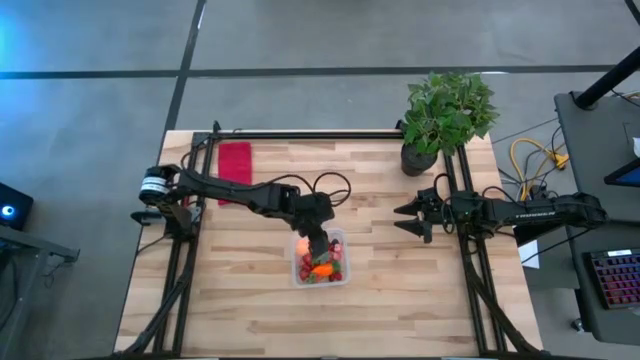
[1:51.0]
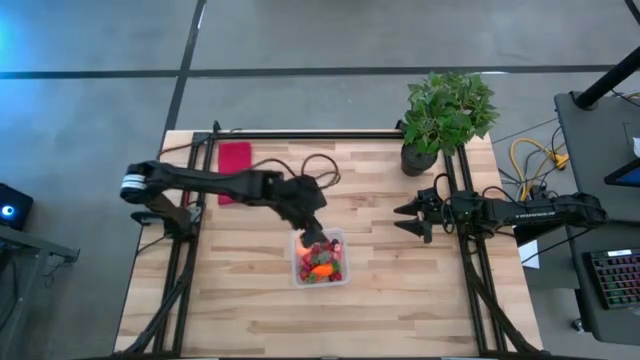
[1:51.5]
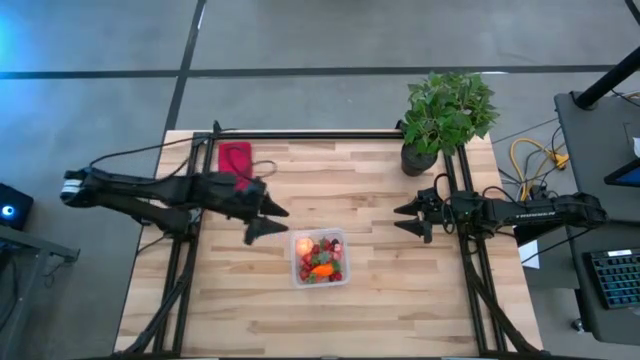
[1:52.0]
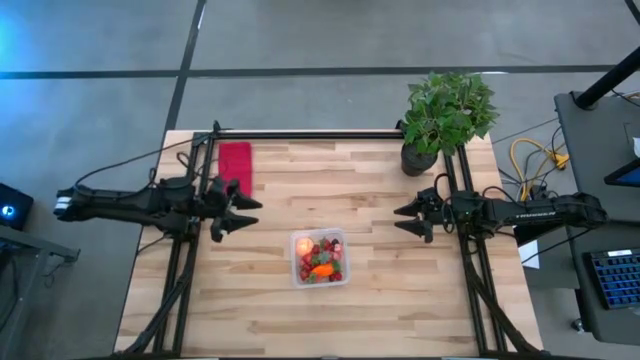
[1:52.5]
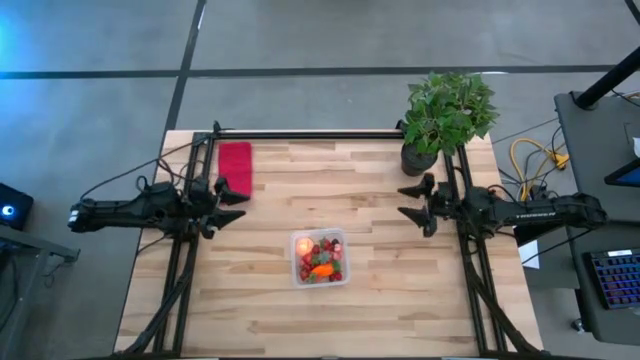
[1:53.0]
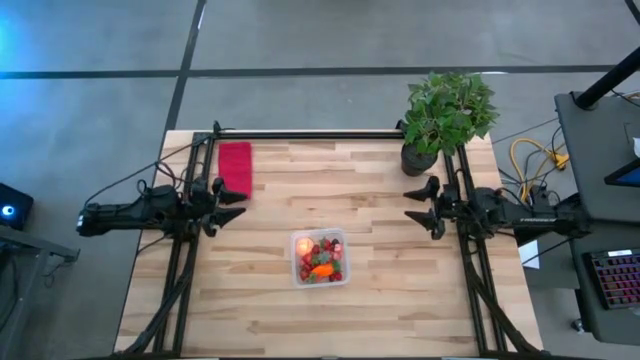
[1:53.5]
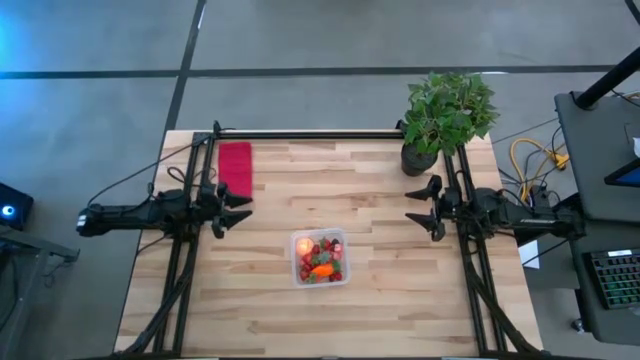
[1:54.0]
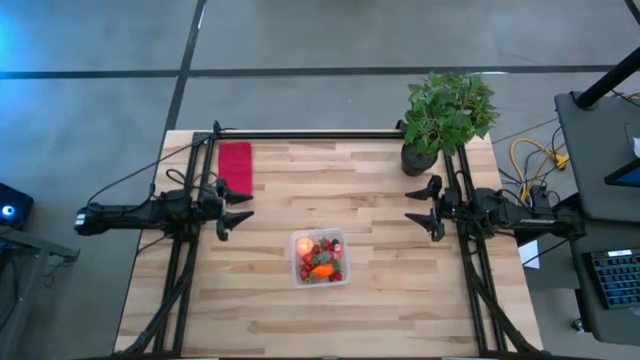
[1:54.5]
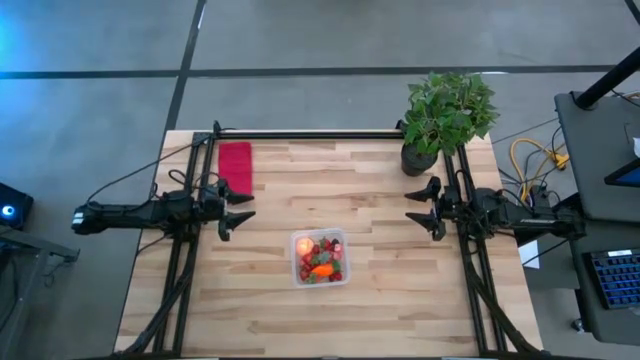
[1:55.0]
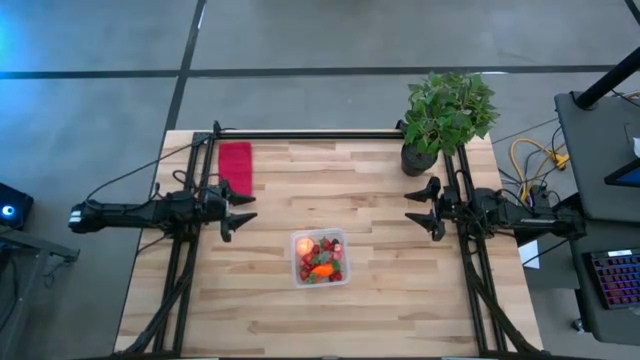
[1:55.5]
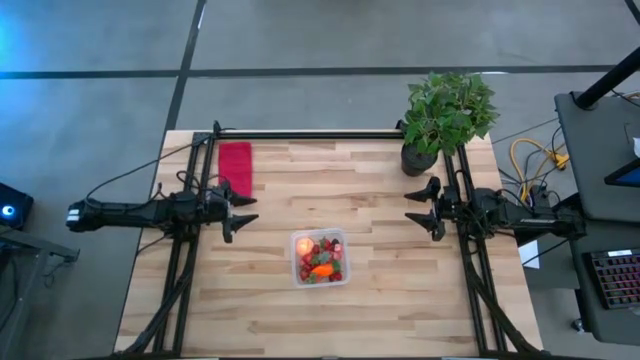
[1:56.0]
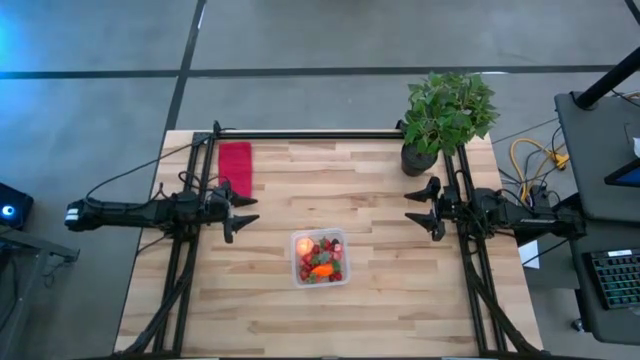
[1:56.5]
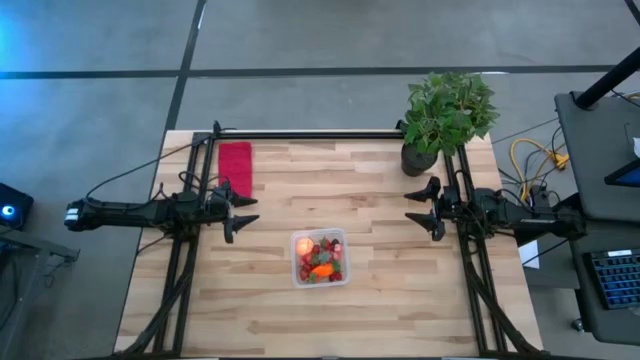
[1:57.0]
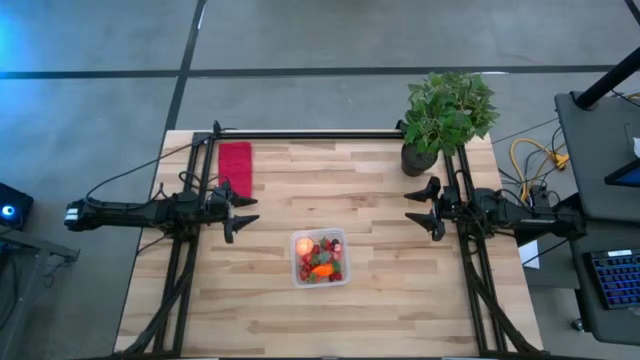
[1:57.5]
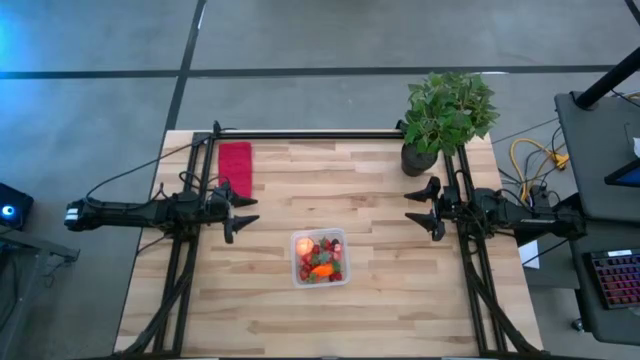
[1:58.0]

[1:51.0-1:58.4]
Task: Pick and placing Produce into tupperware
Return to Home Position

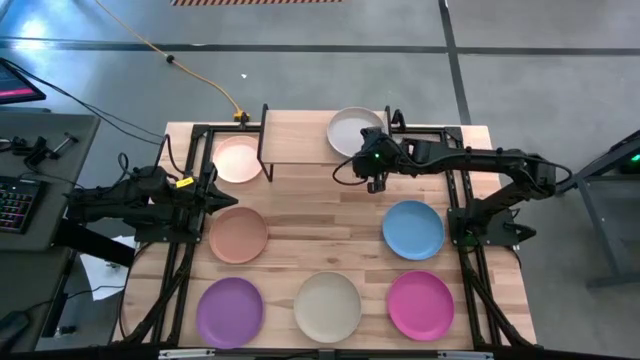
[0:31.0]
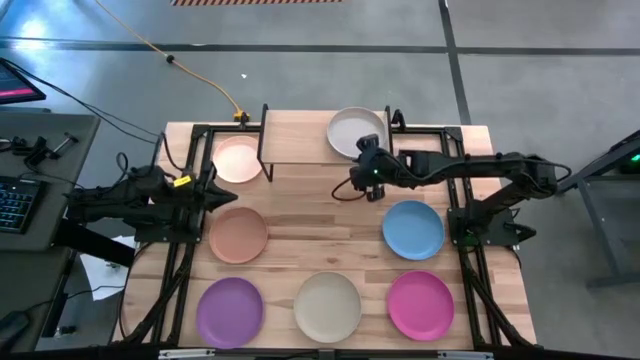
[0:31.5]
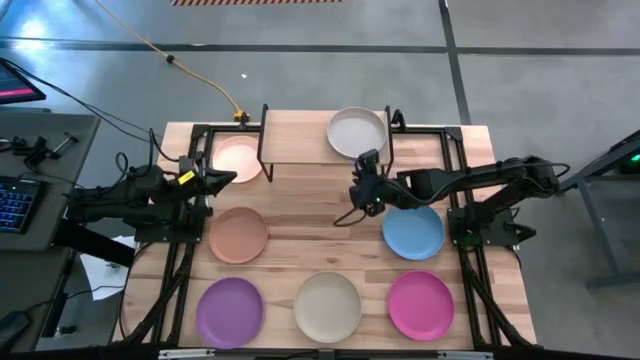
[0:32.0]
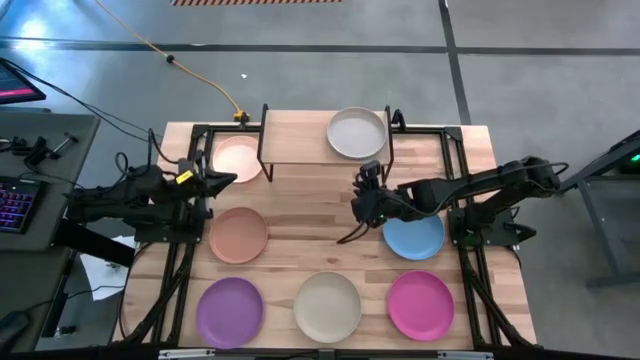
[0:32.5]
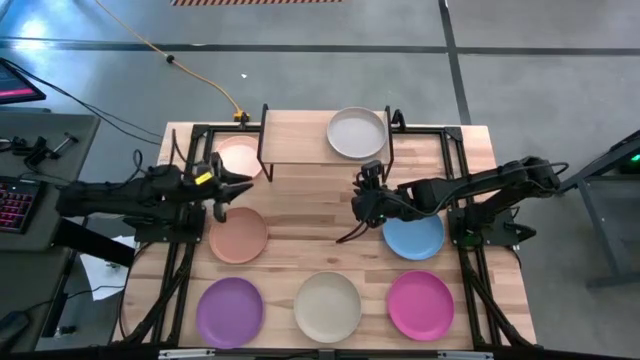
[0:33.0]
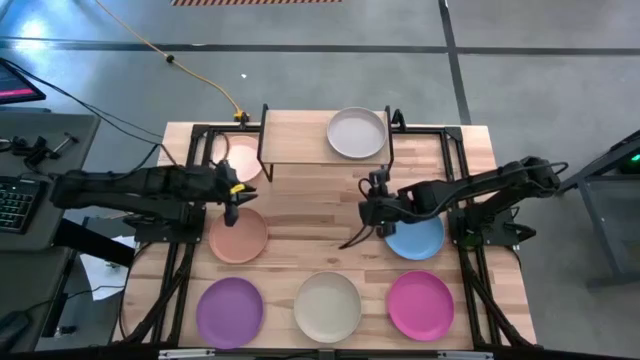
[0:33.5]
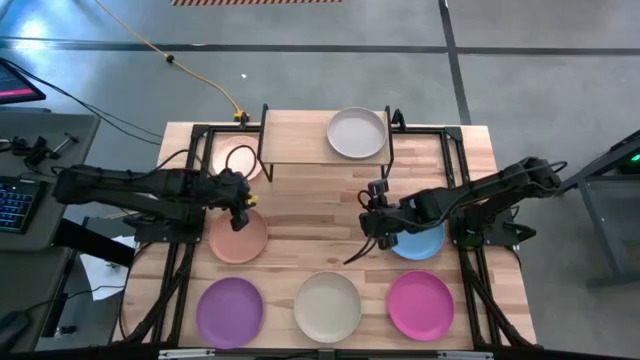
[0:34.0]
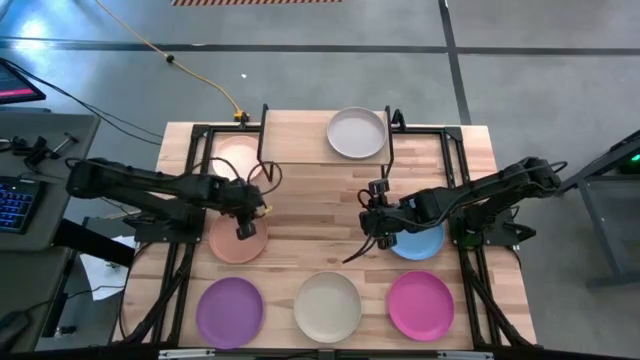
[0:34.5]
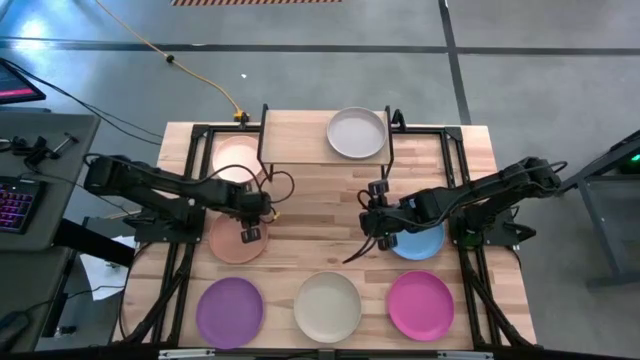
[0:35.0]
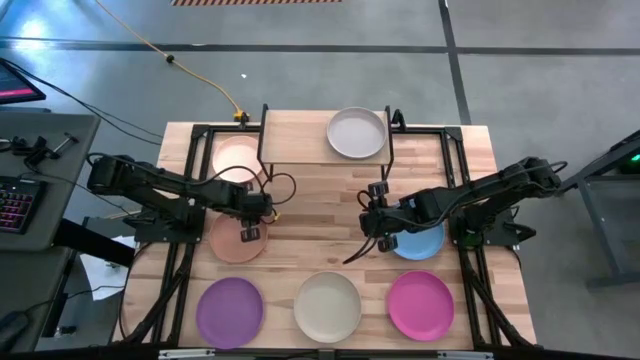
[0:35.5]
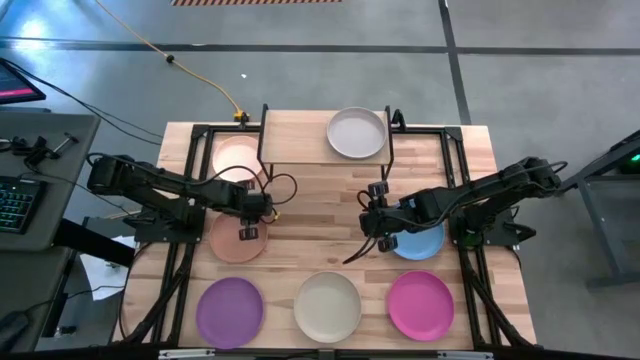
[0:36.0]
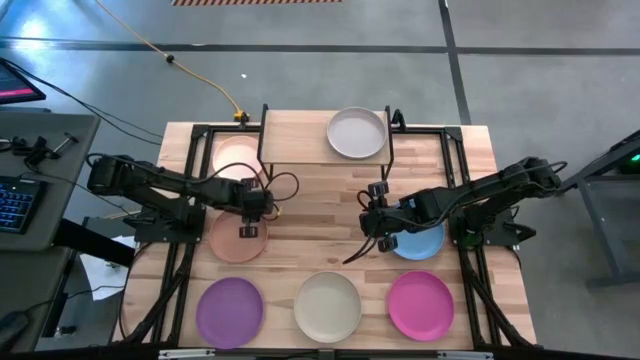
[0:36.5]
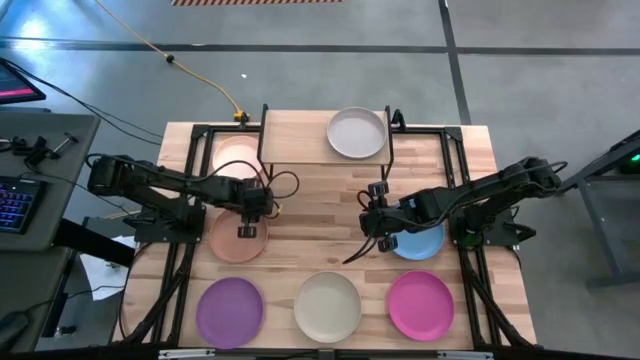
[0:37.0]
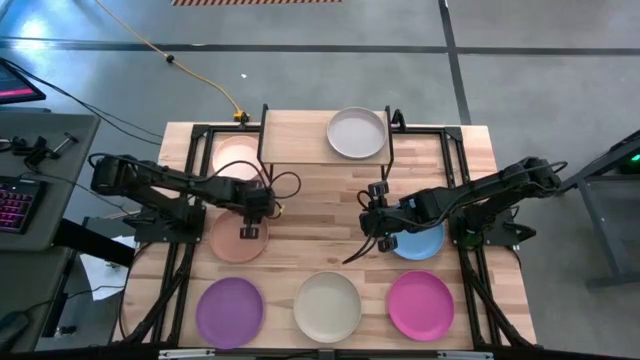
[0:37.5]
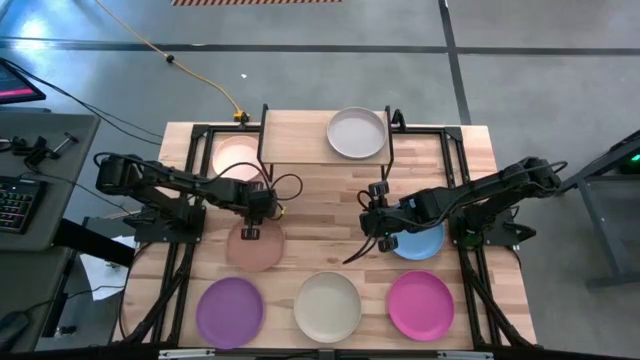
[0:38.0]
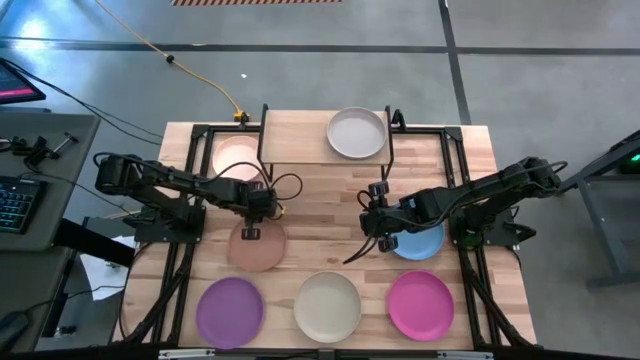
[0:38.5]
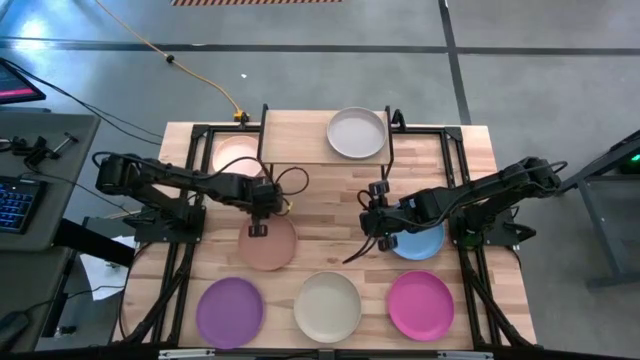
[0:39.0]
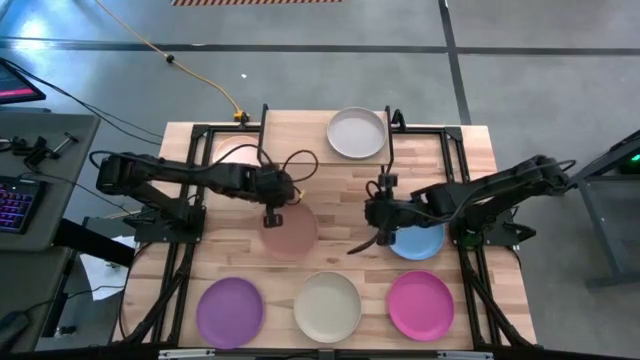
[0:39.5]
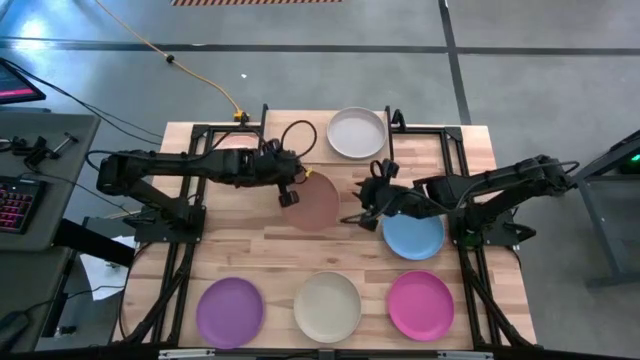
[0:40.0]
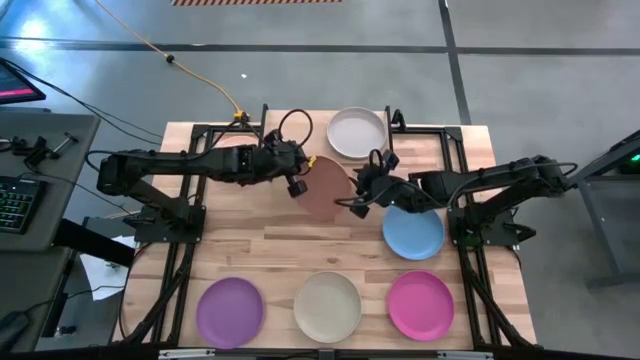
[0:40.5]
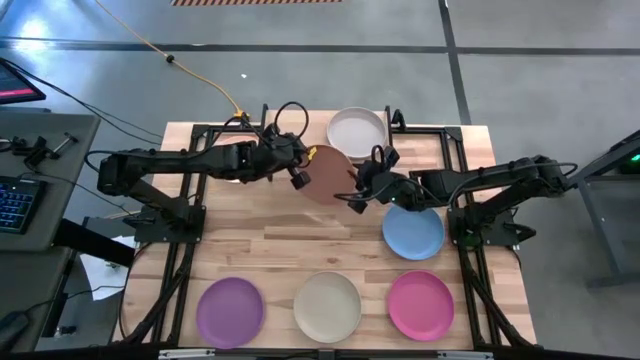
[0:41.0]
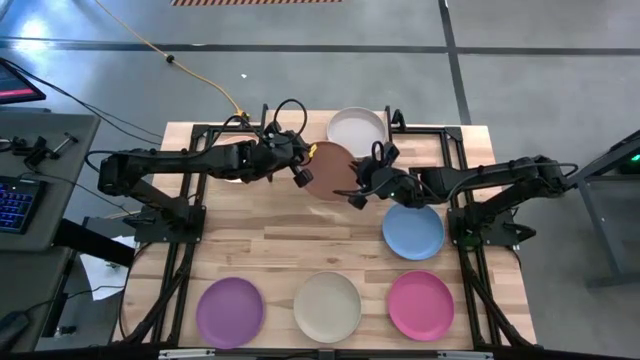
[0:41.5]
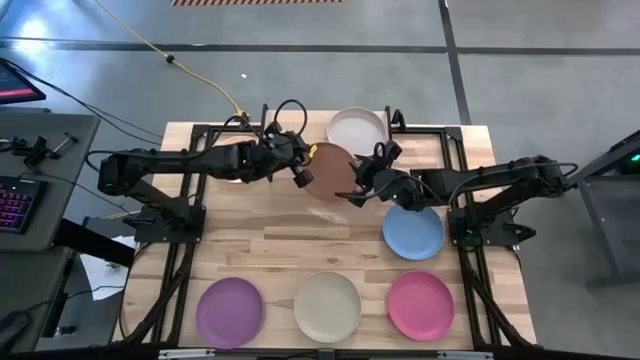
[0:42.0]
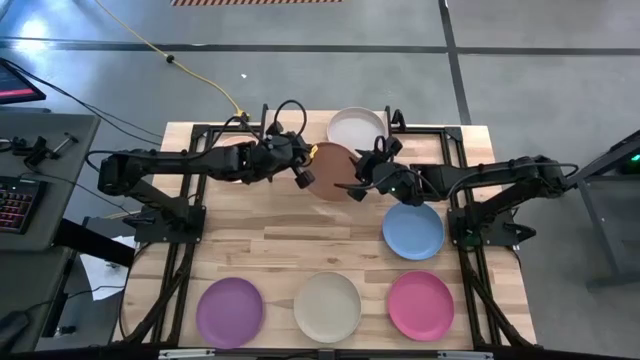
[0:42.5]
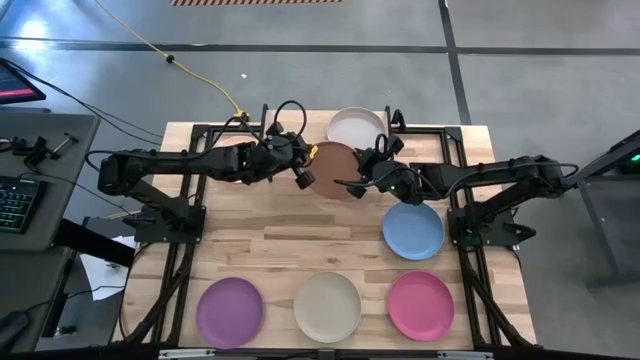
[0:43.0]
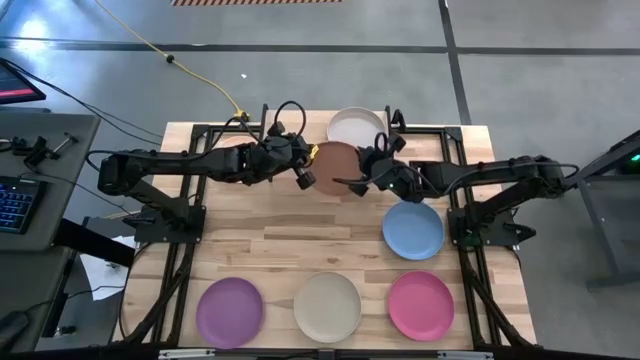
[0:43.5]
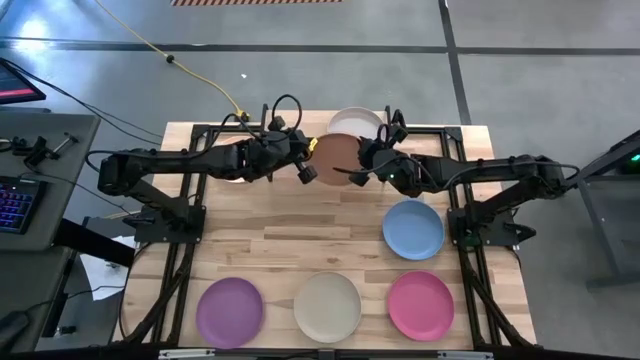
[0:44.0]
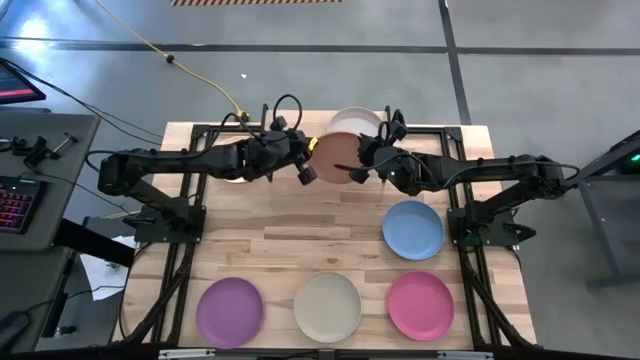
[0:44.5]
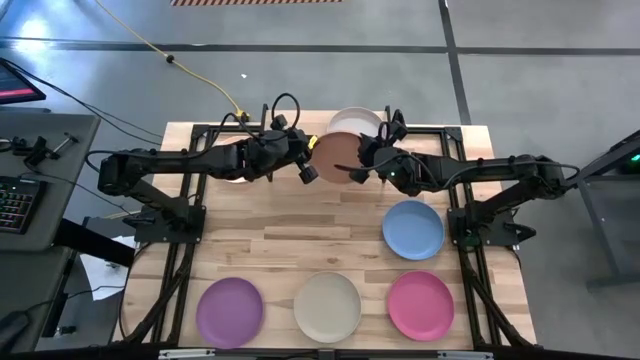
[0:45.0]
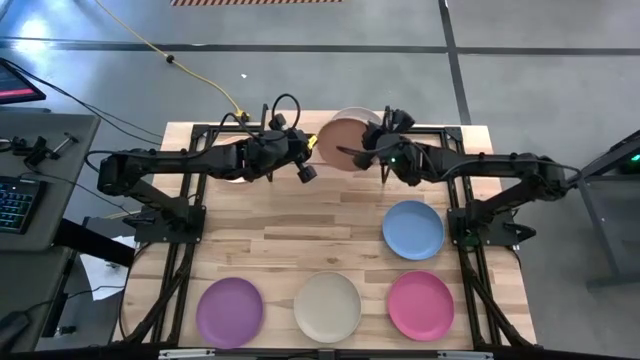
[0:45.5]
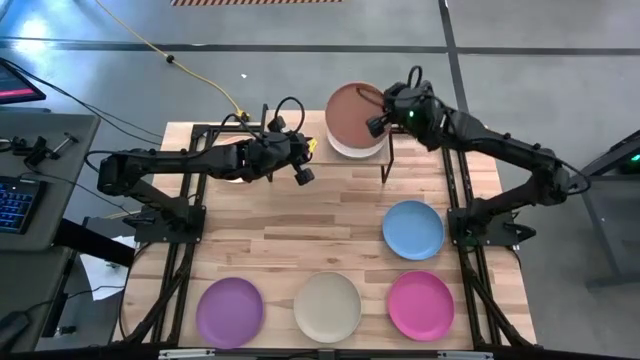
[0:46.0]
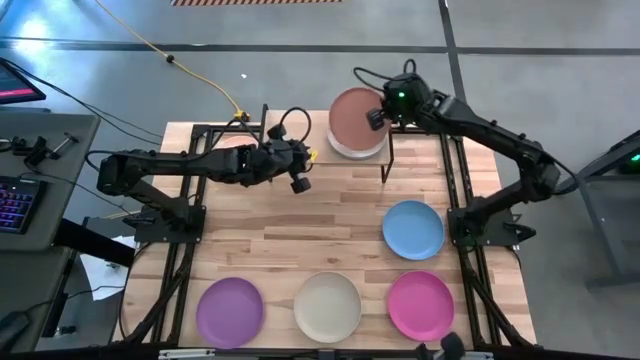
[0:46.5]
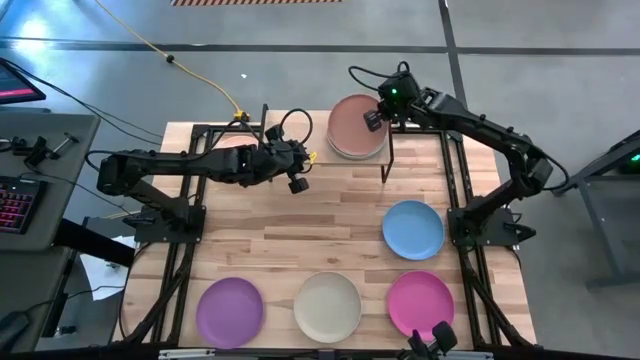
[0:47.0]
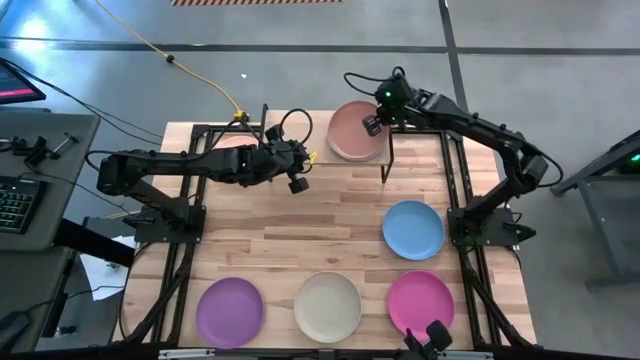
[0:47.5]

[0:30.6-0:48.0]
Task: Place and stack plates onto a shelf
Stack the light orange plate into the light gray plate on the shelf
